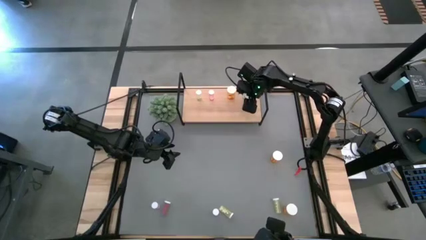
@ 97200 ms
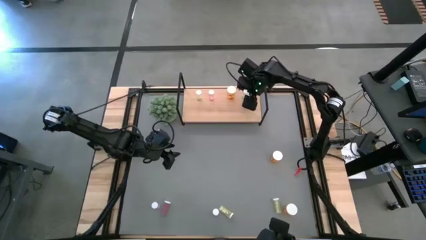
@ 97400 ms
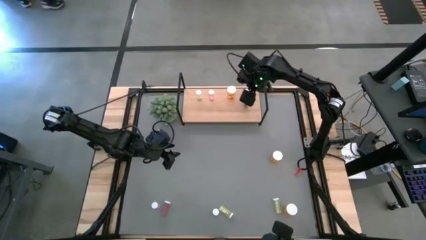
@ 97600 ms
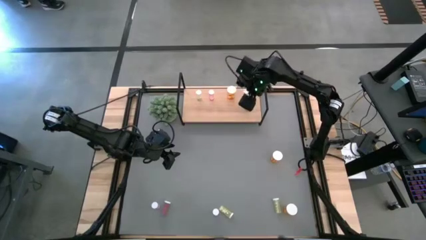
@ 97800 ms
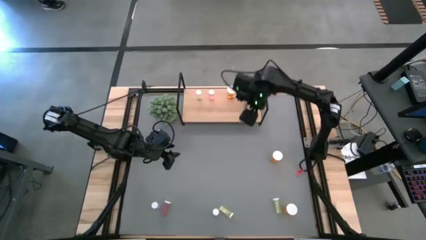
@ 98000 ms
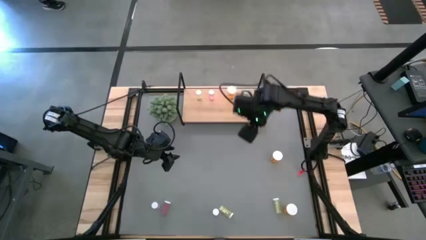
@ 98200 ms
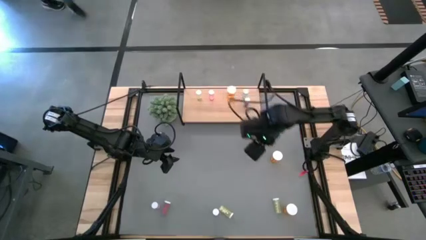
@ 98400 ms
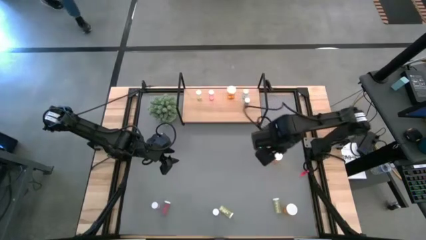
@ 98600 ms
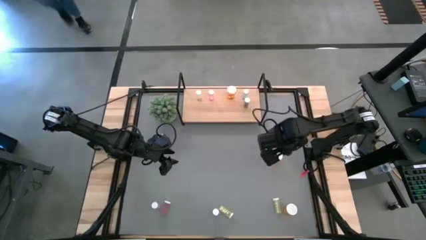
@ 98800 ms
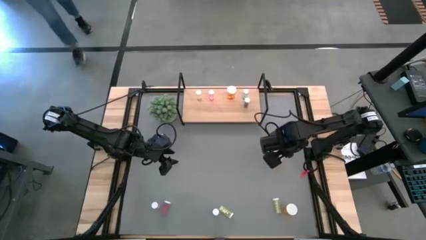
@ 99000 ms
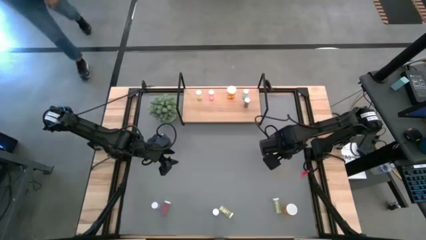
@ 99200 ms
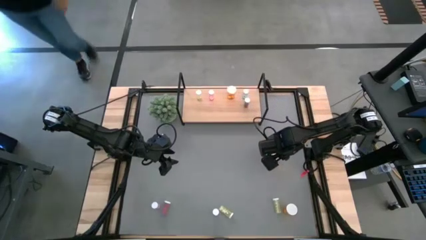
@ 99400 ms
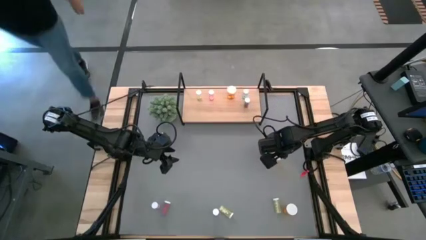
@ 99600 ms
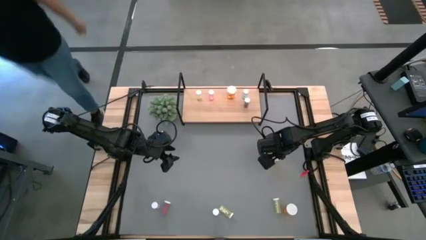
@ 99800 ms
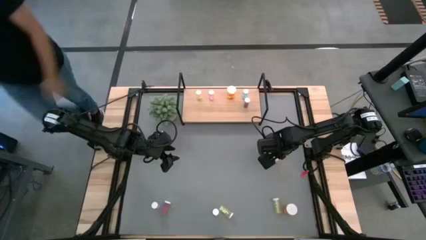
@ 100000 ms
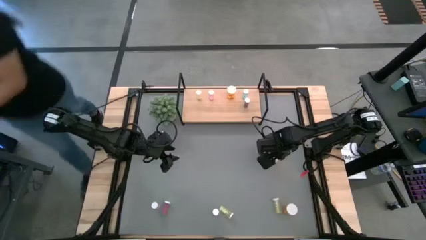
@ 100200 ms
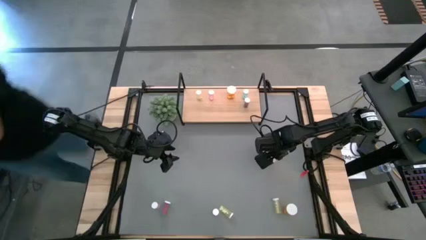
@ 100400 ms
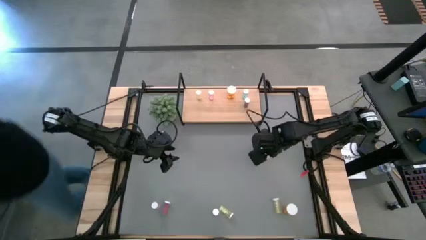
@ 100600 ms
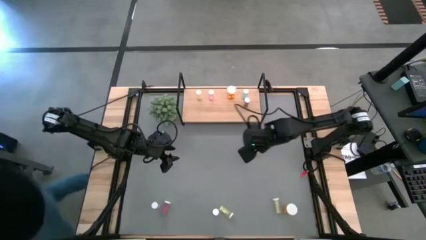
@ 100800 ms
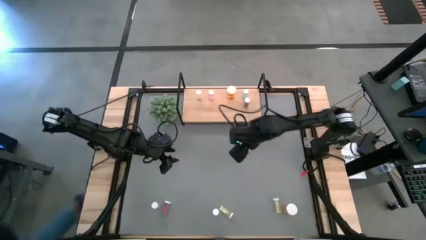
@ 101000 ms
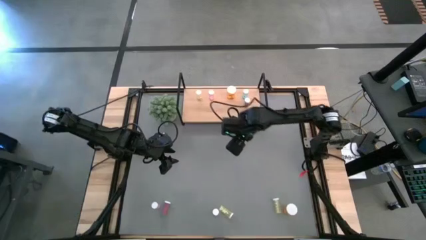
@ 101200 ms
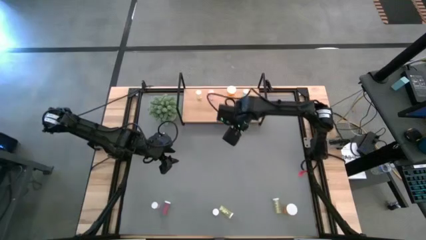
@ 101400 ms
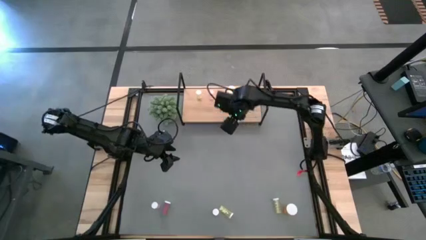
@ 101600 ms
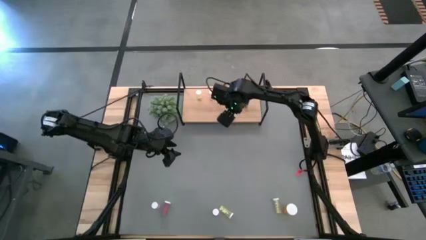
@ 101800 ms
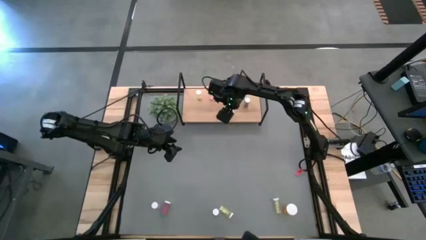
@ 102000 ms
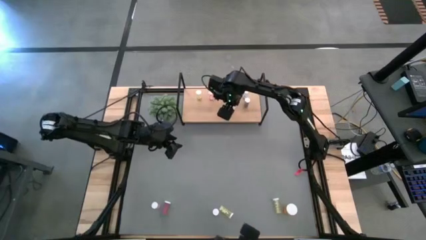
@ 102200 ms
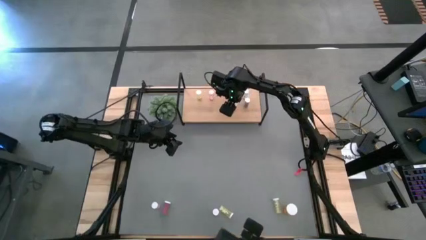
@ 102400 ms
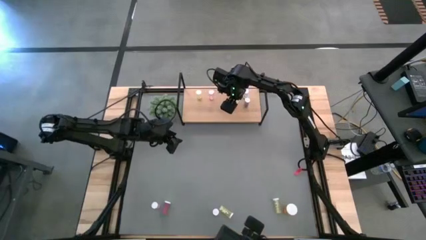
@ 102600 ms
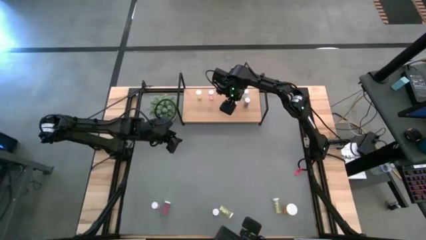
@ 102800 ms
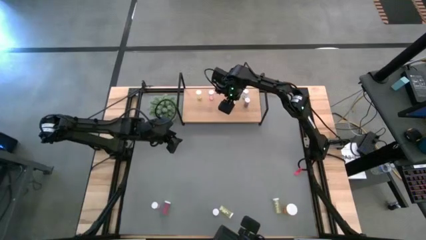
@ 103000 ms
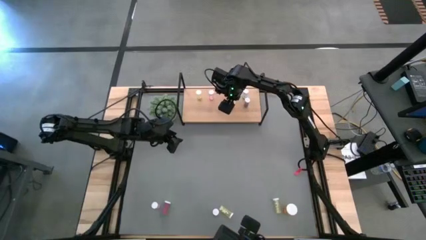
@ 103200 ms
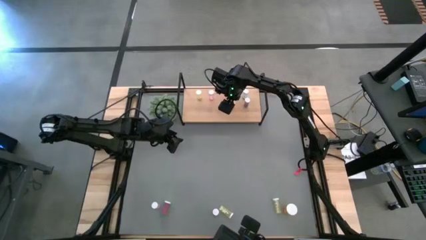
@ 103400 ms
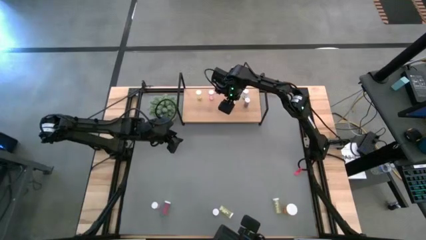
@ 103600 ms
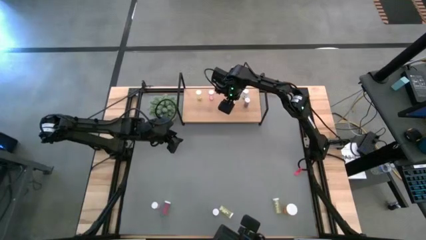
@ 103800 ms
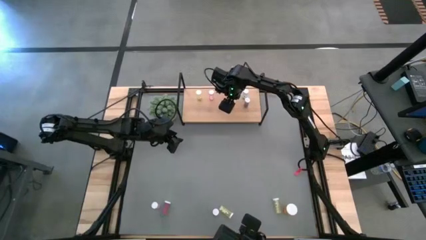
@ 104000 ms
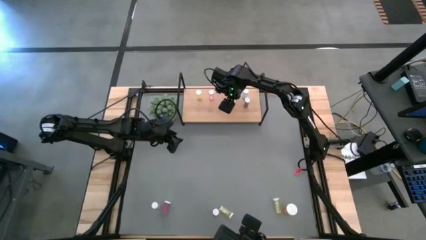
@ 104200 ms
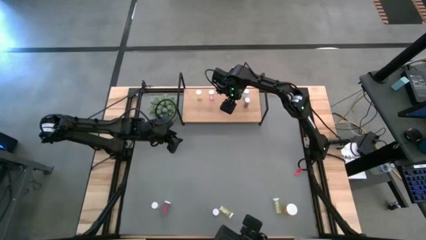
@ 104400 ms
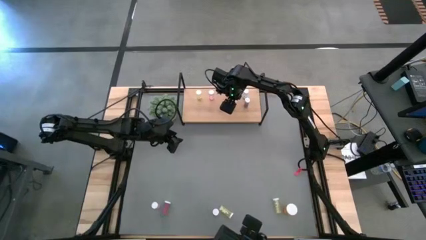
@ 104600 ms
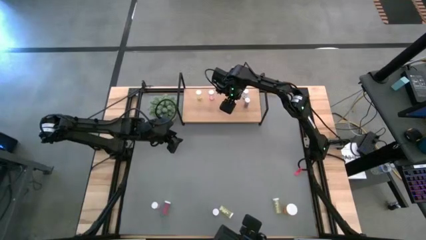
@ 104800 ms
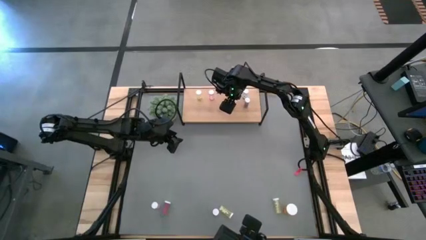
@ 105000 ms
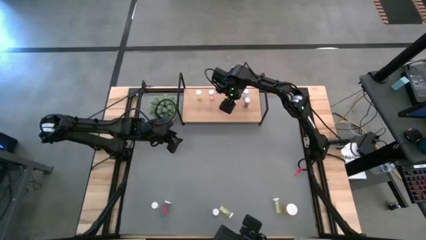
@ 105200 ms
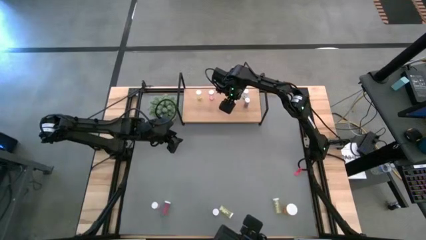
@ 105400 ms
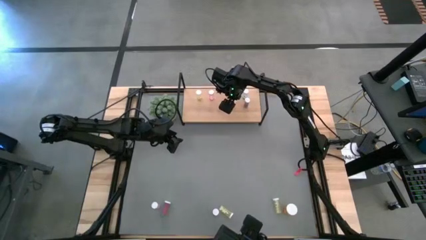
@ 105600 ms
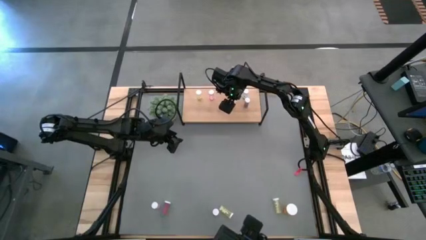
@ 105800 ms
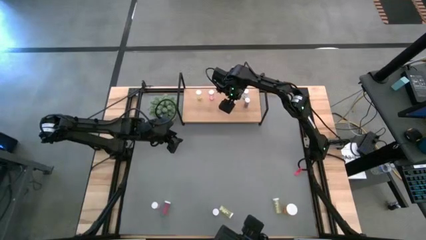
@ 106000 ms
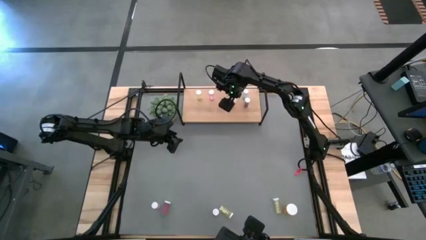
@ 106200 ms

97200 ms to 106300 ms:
Task: Pick and place medicine bottles onto shelf by color
Put the top orange pill bottle on the shelf aligned with the other orange pill bottle

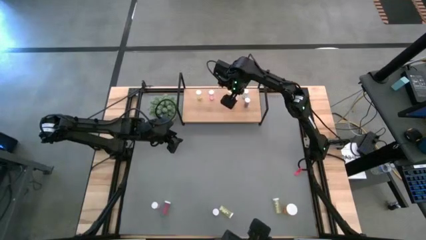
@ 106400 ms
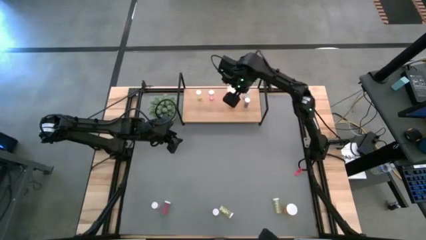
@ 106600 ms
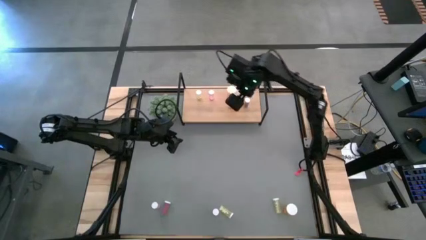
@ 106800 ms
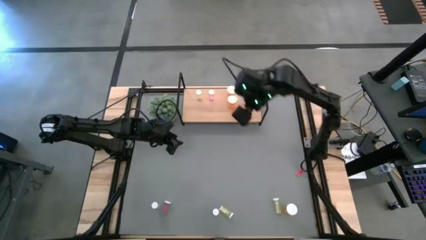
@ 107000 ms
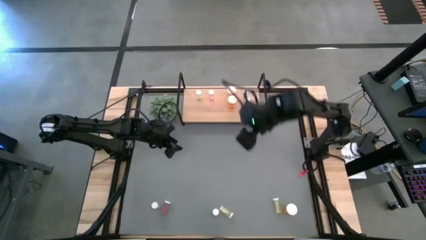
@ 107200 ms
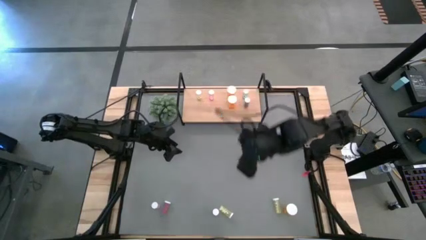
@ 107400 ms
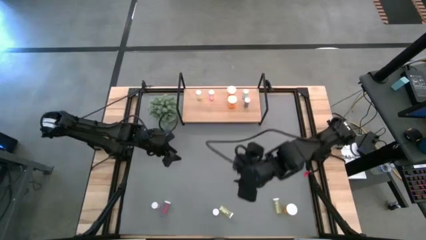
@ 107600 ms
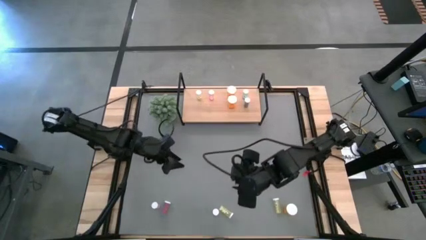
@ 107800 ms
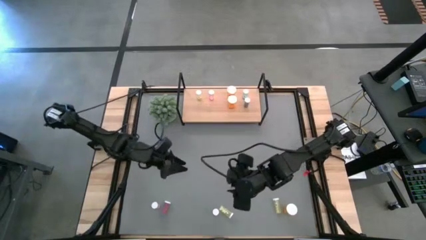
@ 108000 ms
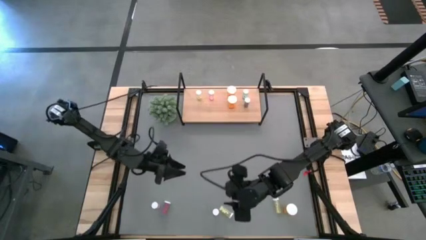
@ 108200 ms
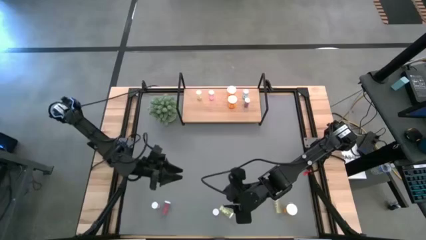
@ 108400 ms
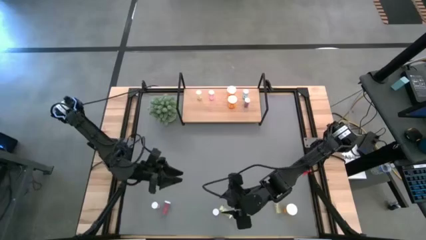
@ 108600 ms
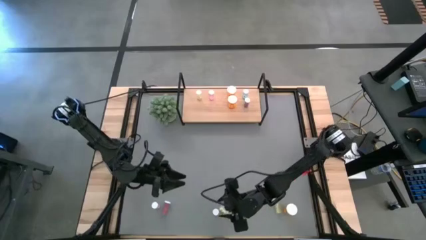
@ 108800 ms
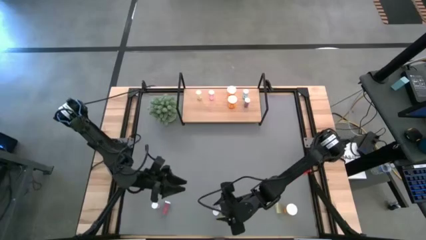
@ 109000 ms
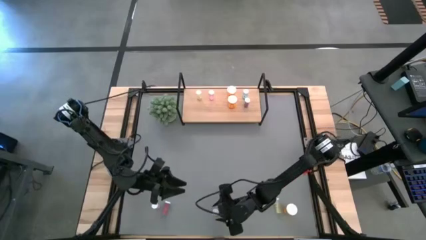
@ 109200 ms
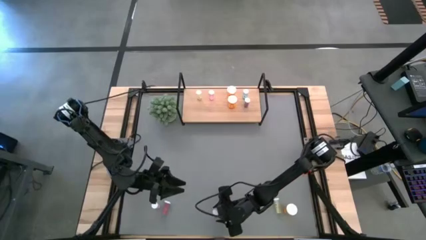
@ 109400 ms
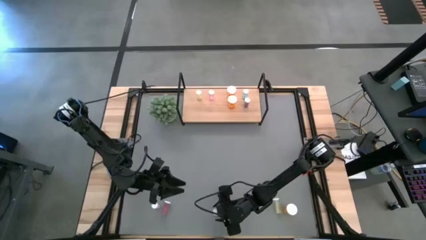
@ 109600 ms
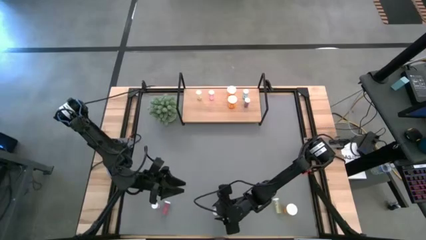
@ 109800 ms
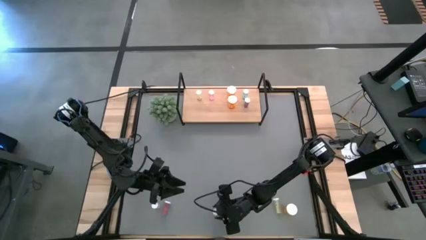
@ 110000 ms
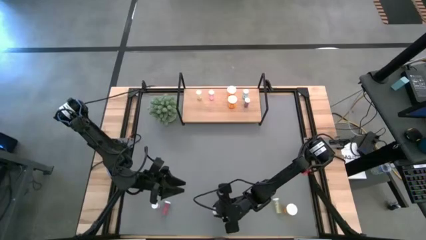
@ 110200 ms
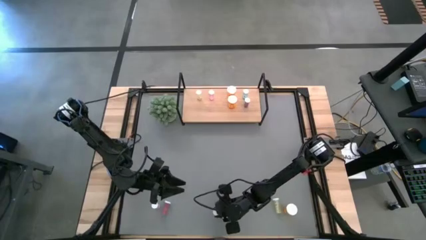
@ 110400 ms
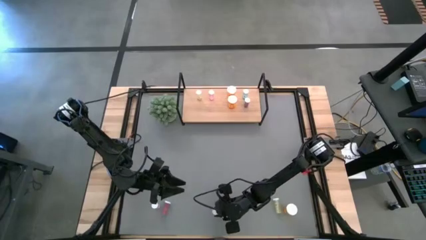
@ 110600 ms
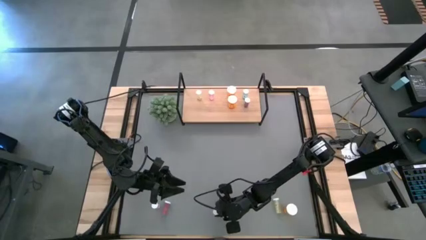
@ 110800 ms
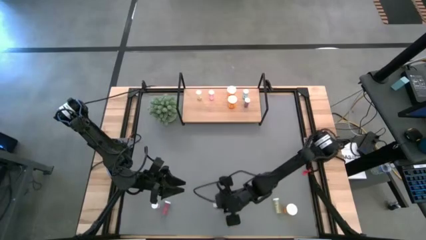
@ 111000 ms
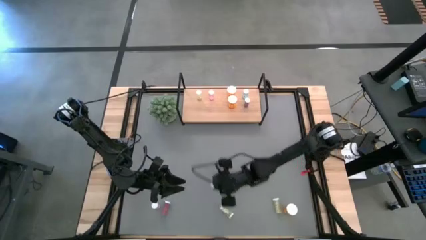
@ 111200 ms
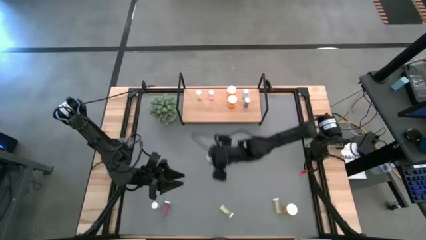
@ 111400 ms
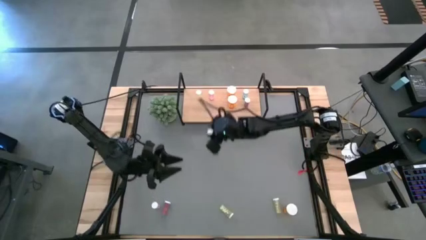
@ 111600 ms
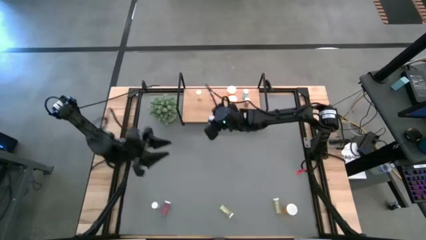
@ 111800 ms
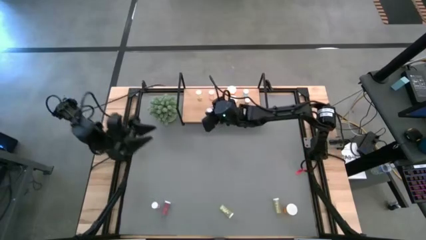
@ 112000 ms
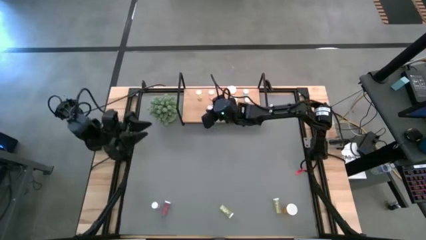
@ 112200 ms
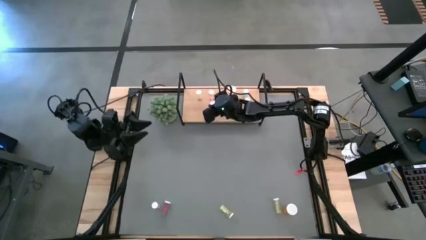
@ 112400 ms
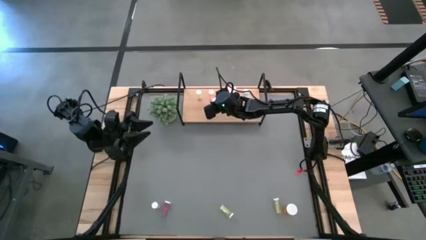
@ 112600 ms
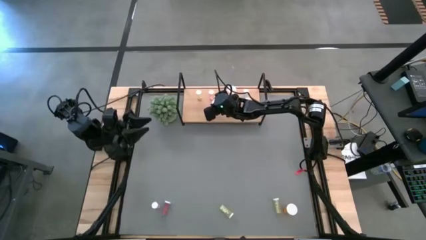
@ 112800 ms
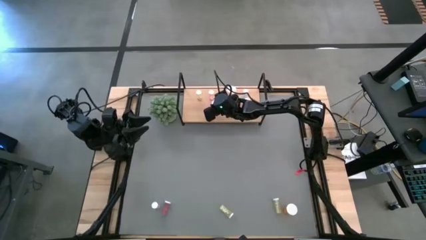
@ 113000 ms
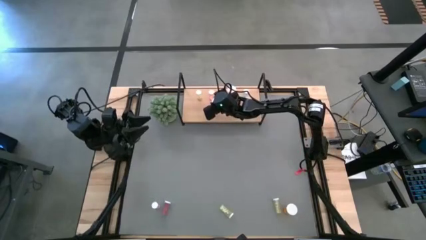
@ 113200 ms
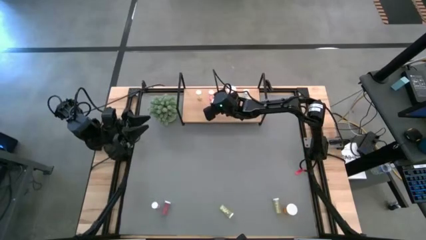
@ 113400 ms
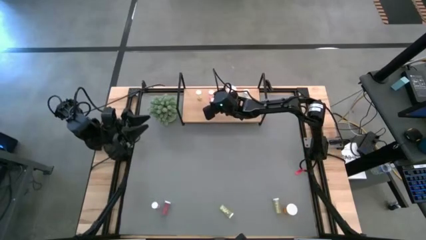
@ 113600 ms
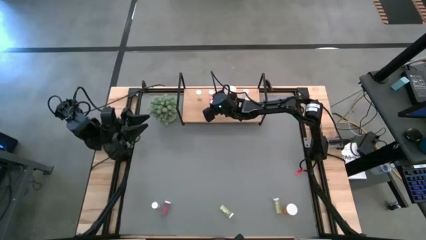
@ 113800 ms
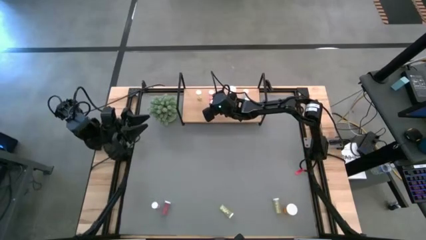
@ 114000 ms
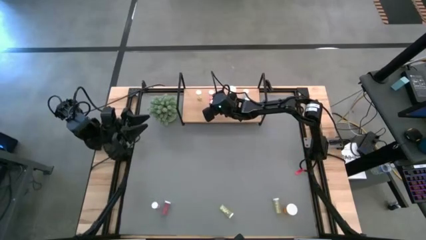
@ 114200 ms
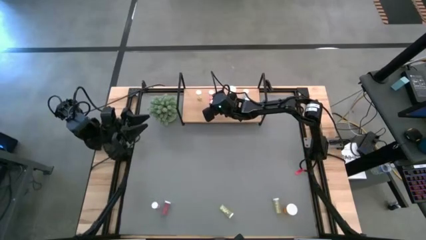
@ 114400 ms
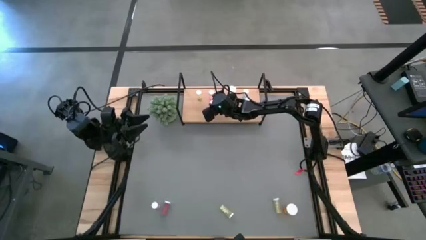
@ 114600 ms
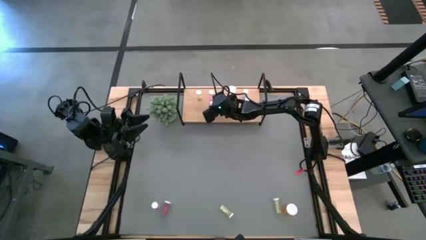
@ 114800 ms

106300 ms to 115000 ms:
Put the pink pill bottle on the shelf
